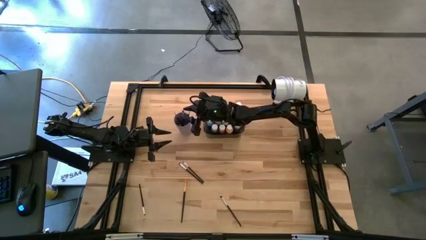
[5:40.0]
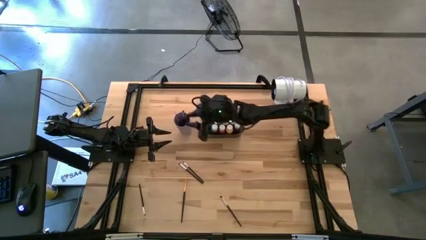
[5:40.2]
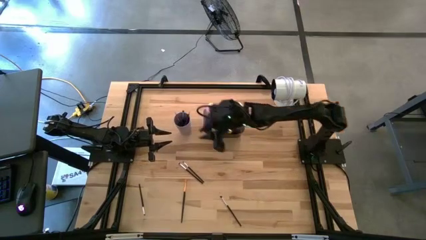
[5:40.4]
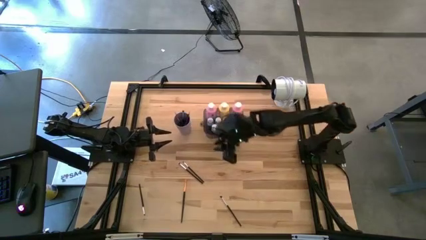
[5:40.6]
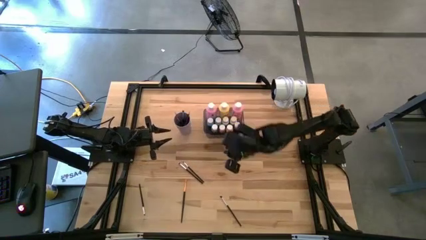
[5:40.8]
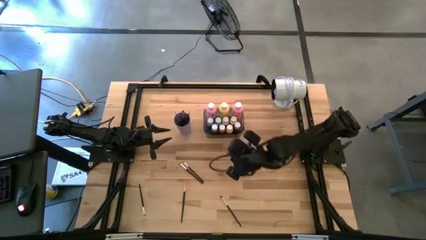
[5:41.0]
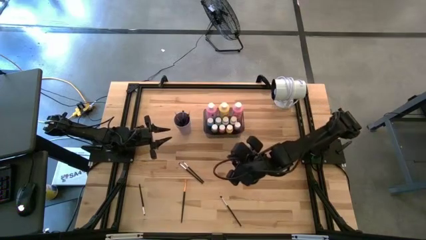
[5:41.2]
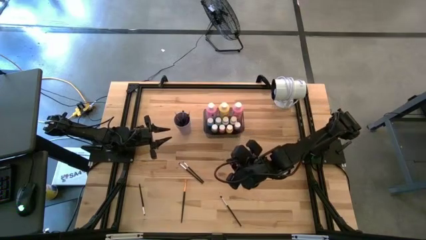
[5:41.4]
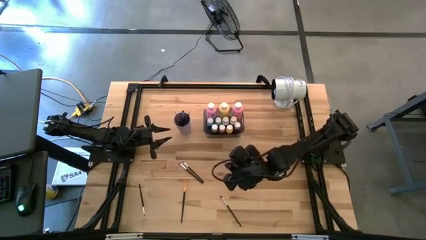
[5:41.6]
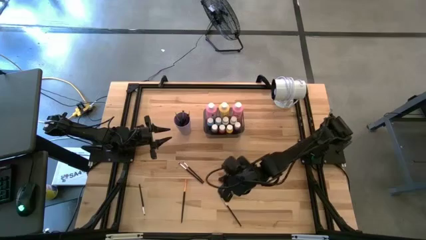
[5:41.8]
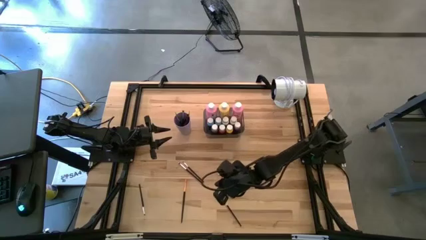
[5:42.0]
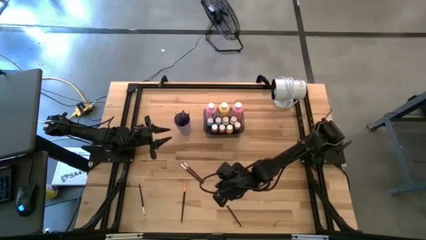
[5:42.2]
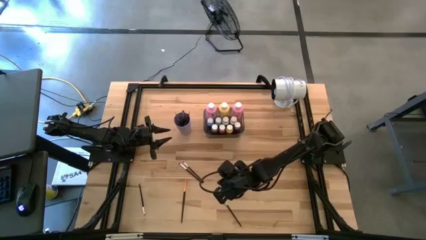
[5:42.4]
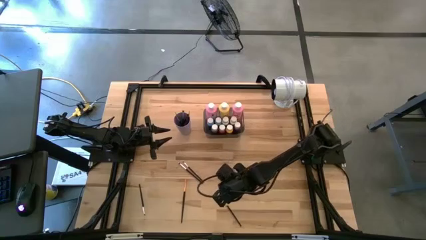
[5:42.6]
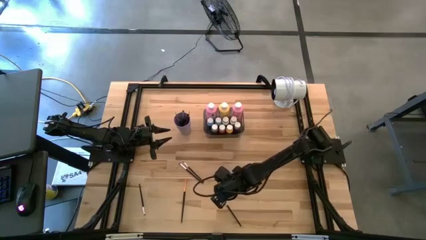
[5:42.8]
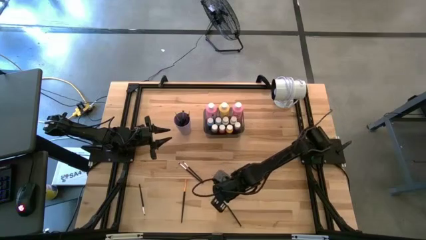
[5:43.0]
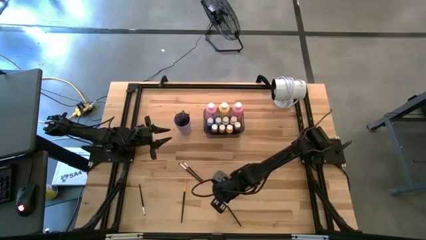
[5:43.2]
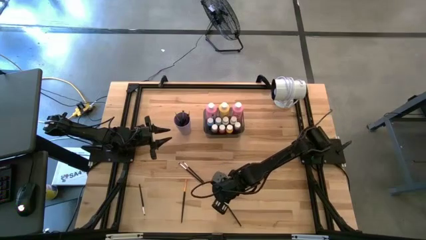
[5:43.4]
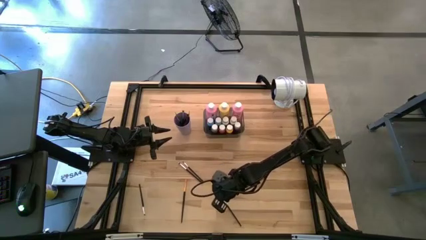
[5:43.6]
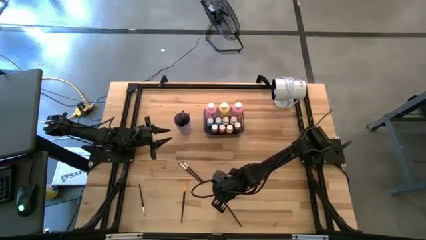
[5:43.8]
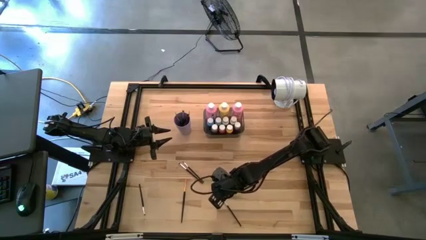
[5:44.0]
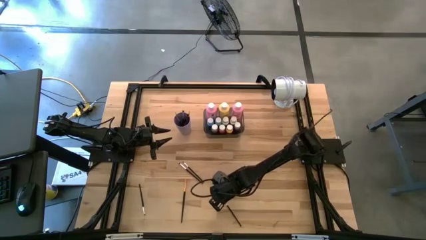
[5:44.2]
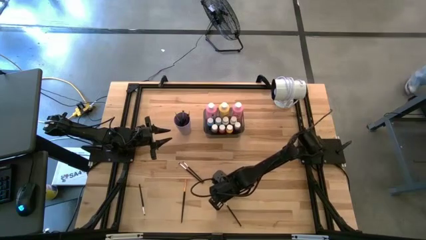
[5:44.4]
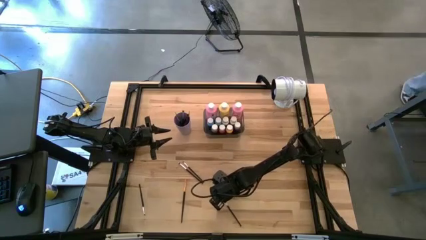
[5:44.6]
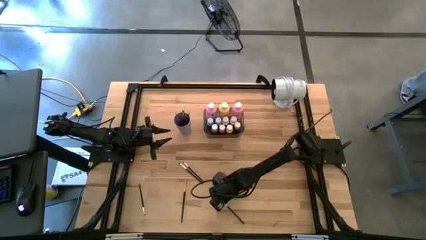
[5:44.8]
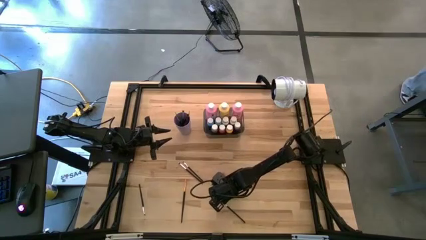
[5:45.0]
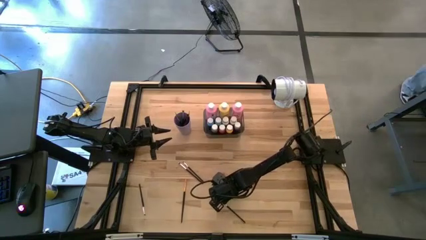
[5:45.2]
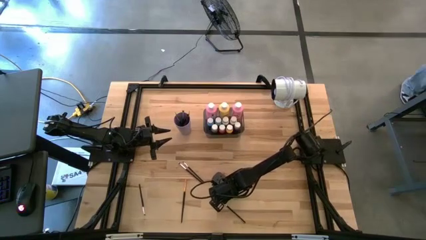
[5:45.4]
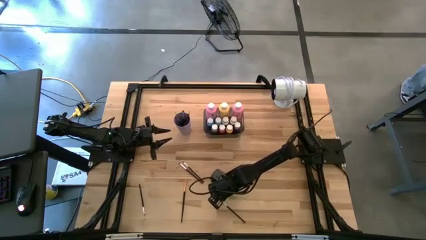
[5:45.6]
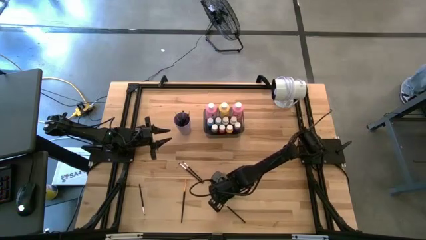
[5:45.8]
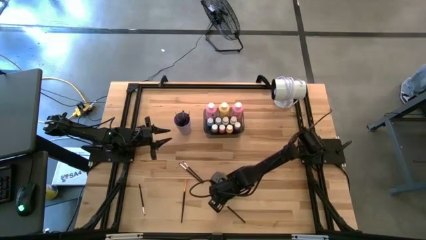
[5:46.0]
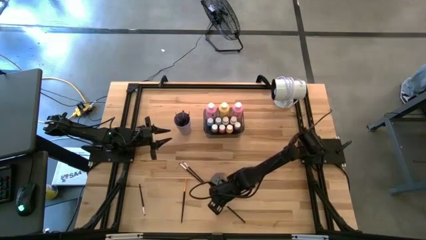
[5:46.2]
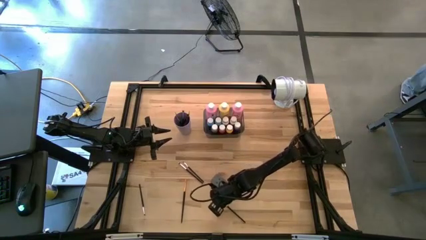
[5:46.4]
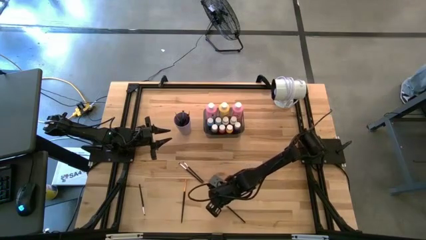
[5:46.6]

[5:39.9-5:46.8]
Task: Pick & Place Paint Supplies
Put the silver paint brush into the purple cup

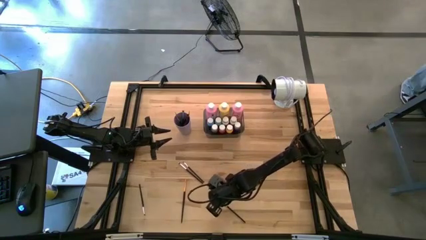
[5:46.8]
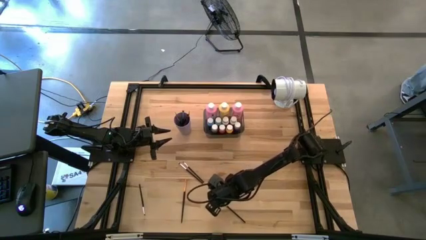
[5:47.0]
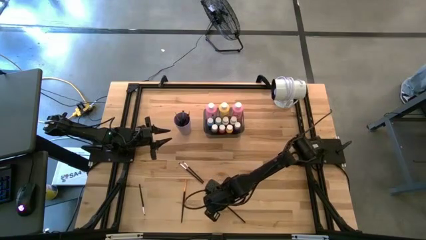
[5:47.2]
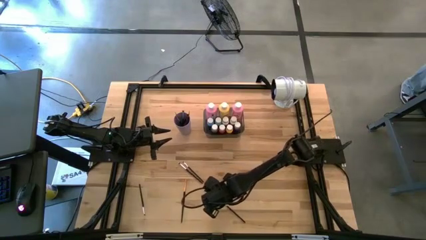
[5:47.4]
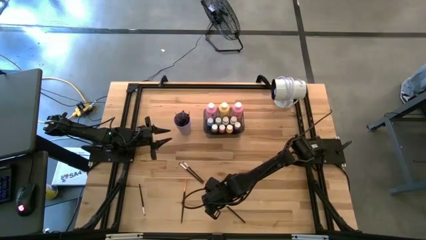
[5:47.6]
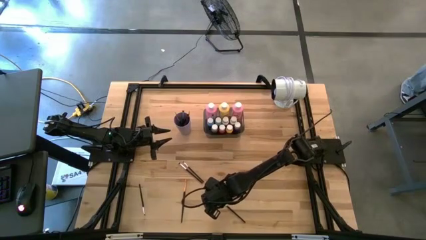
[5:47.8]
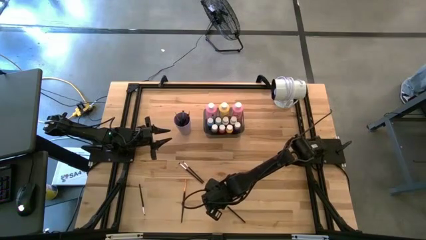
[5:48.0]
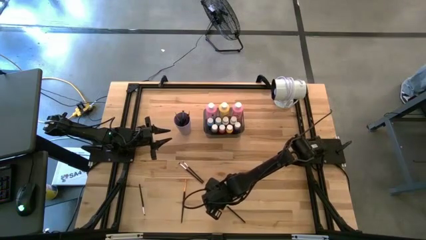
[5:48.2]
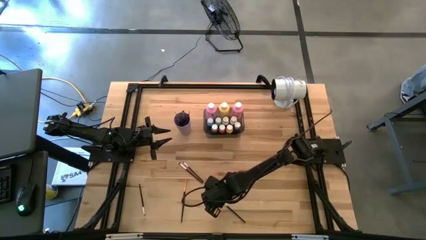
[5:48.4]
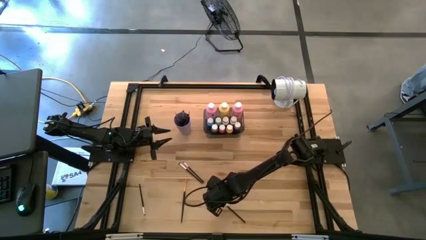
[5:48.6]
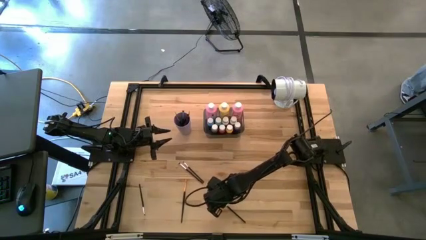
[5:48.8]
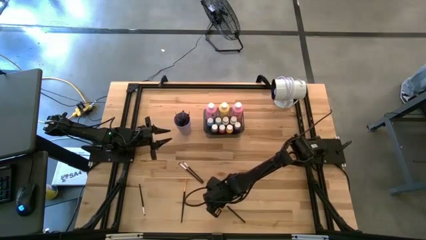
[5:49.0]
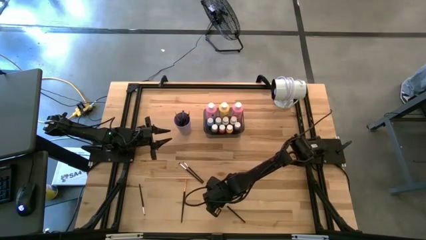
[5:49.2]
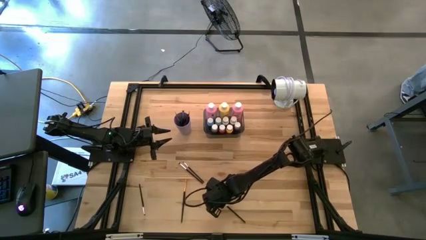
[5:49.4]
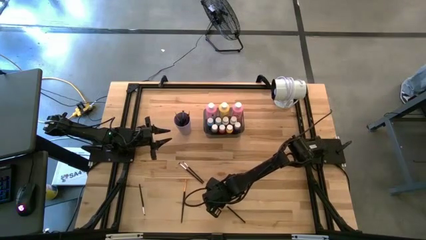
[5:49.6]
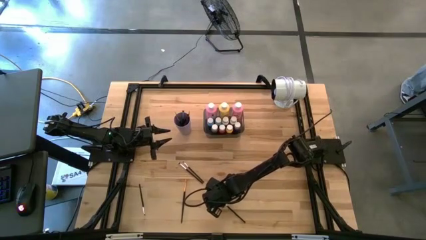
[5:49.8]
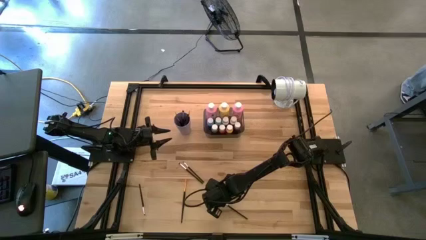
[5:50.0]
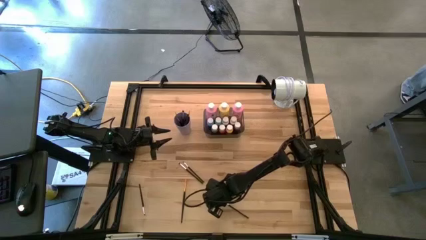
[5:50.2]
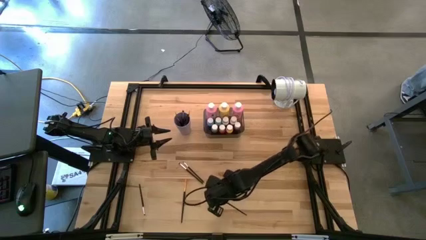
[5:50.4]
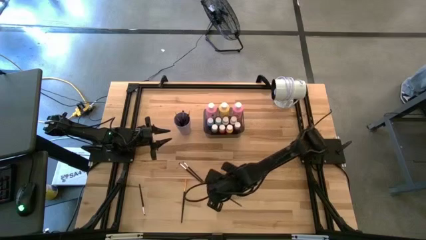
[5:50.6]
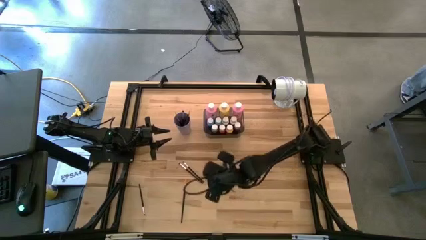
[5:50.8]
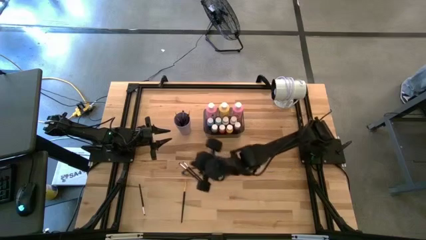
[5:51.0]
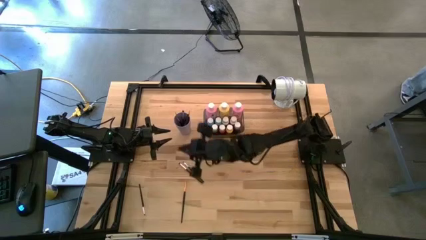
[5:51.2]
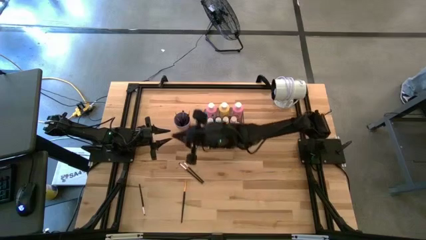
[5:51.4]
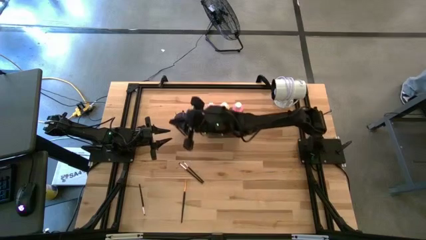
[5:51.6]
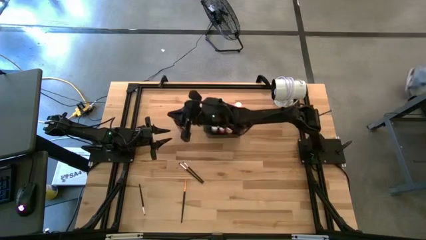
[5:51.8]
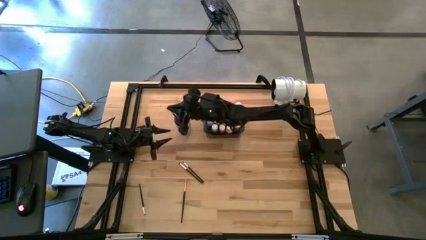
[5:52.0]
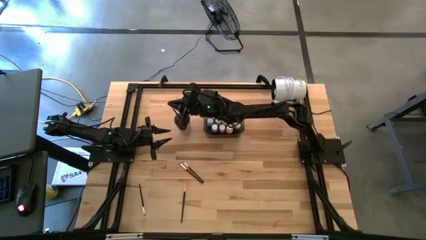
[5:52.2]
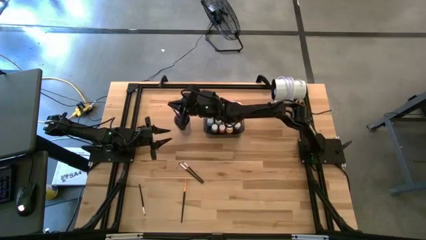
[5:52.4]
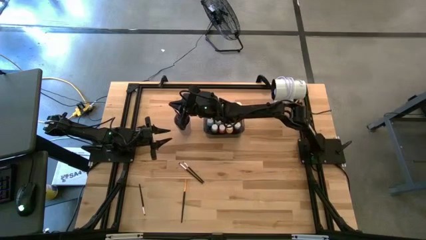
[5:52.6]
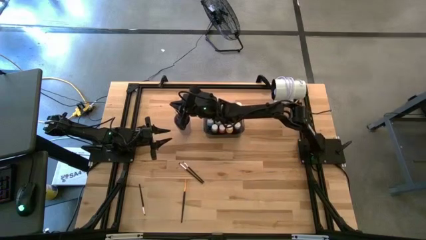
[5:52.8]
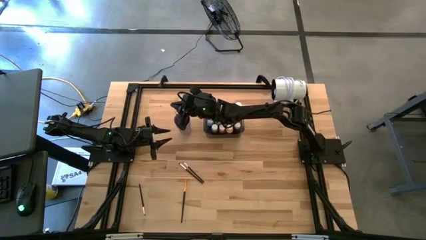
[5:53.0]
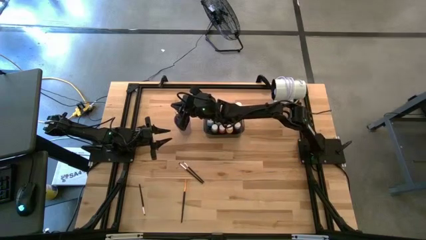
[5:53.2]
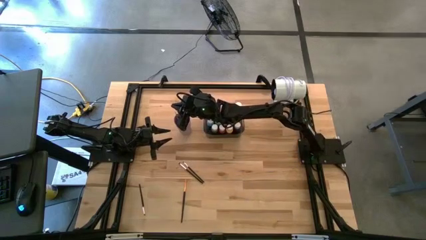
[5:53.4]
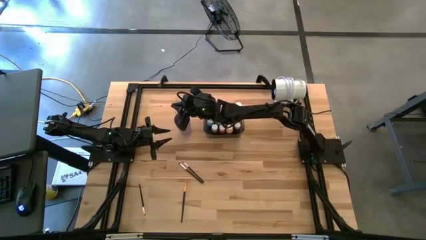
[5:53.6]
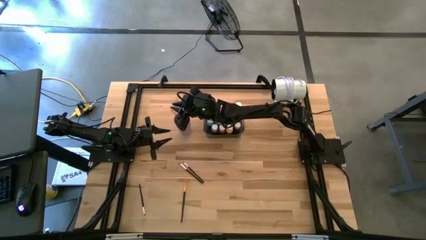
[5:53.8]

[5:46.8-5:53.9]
Put the silver paint brush into the purple cup

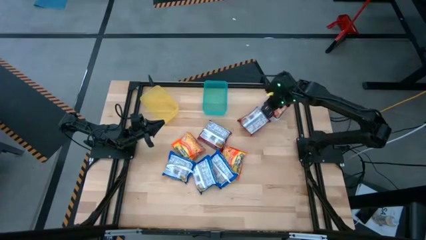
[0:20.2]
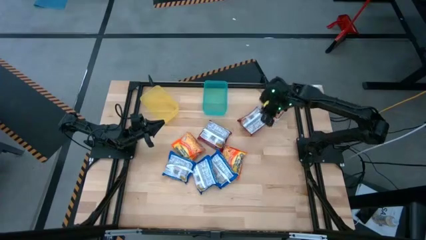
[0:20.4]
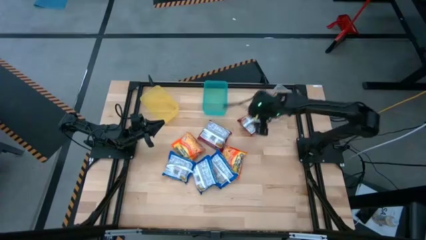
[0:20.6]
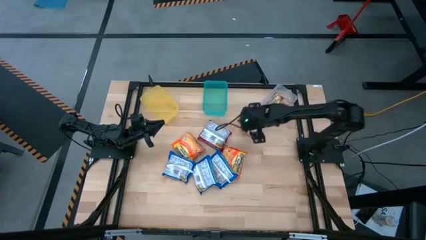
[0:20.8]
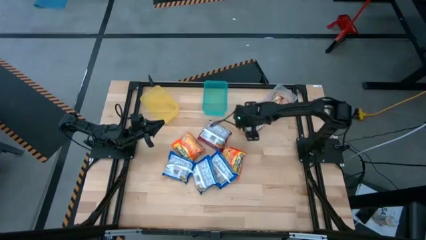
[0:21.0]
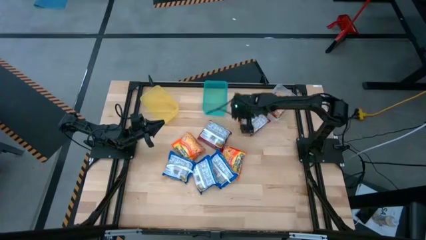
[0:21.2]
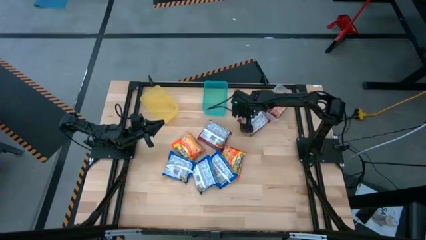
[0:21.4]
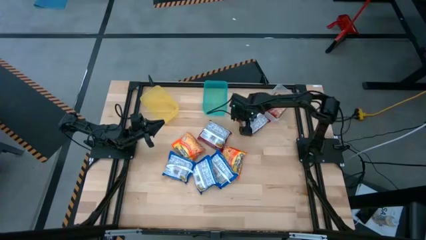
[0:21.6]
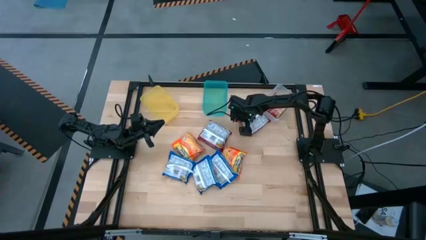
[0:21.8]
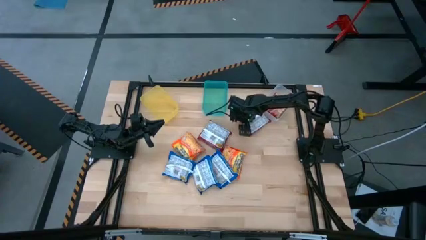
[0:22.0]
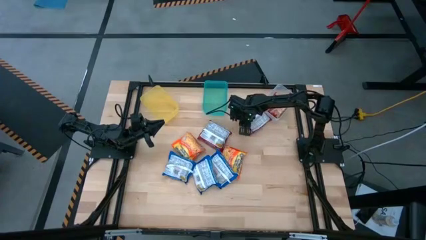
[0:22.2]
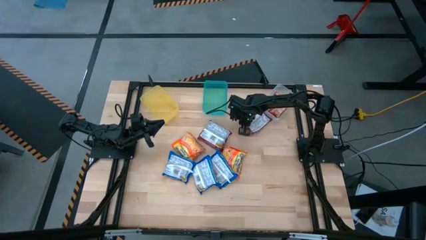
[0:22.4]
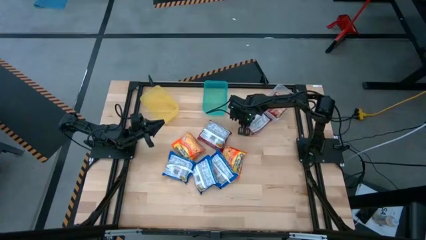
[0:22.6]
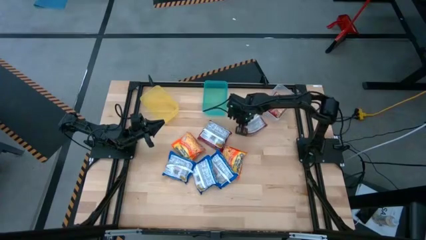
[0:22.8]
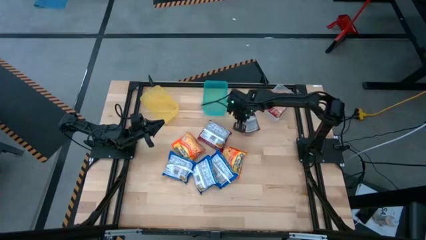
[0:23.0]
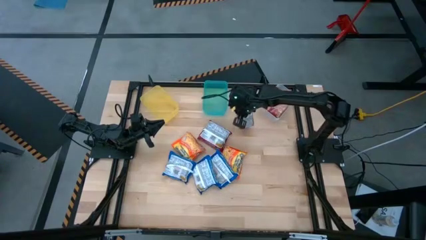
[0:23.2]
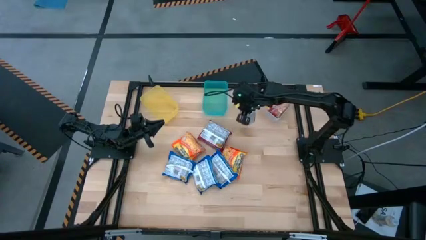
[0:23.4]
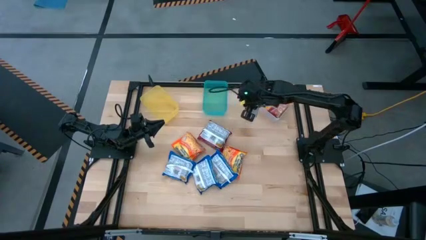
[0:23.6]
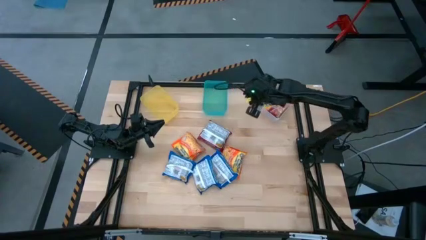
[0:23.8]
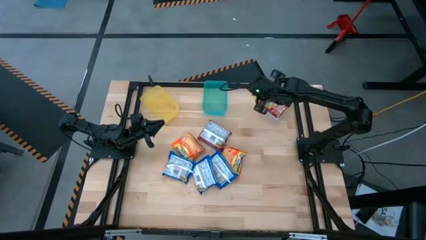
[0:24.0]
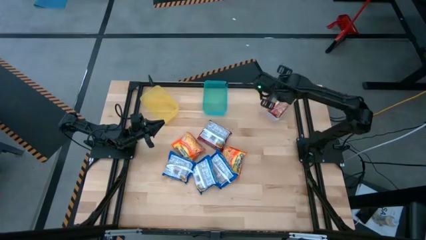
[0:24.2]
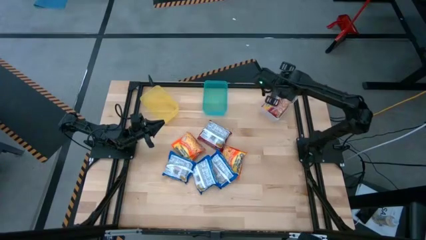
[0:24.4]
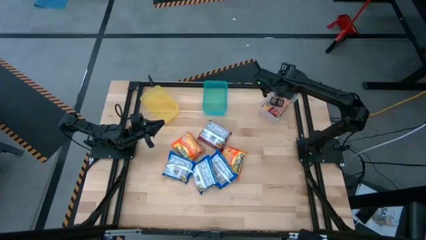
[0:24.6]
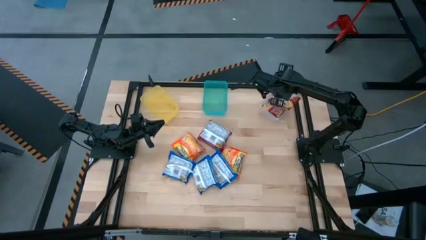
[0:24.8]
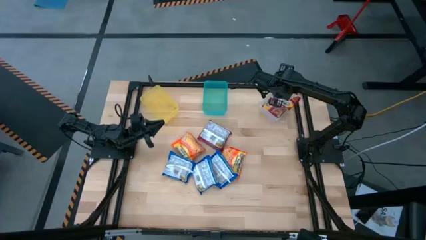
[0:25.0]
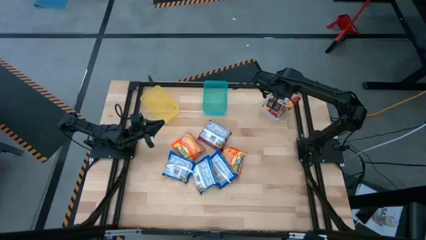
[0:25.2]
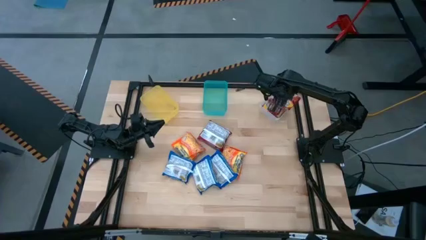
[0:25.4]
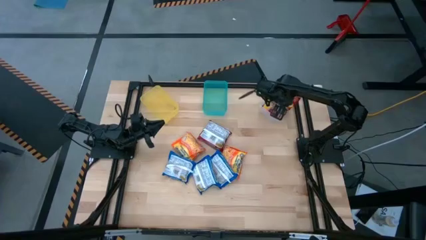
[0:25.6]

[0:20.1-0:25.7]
Task: Sort Maruchan noodles
Put the right red noodle pack into the transparent bin
